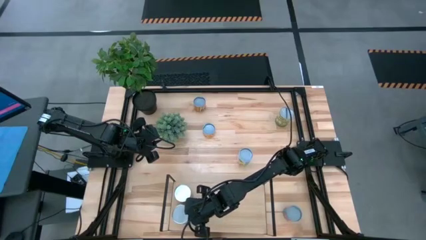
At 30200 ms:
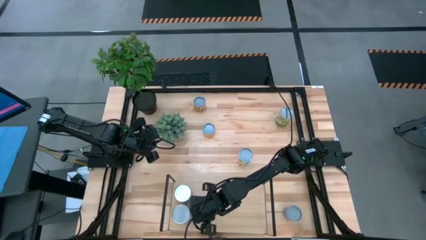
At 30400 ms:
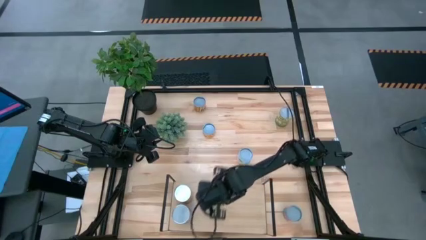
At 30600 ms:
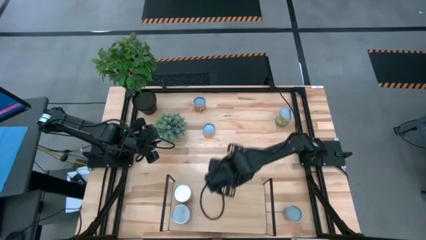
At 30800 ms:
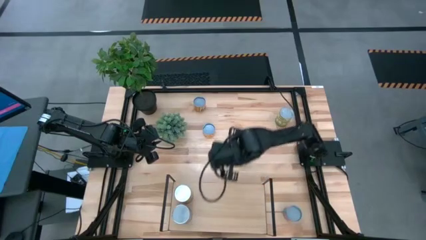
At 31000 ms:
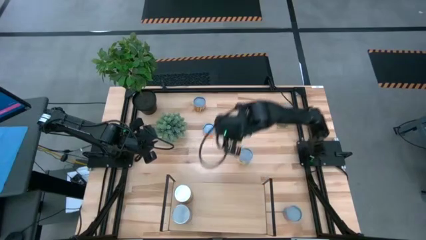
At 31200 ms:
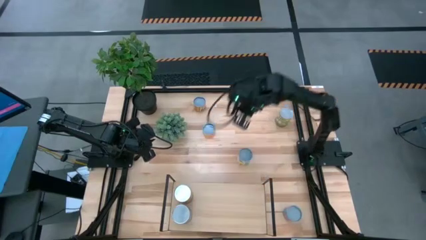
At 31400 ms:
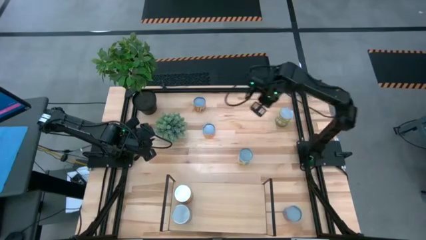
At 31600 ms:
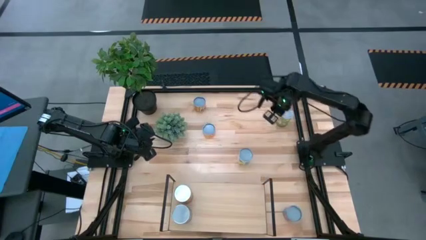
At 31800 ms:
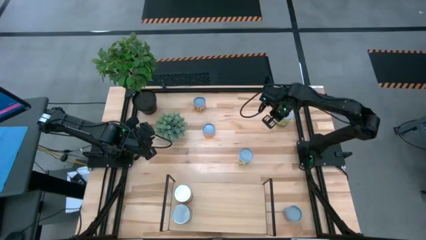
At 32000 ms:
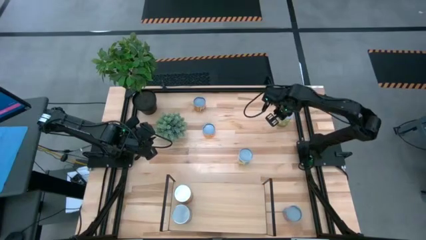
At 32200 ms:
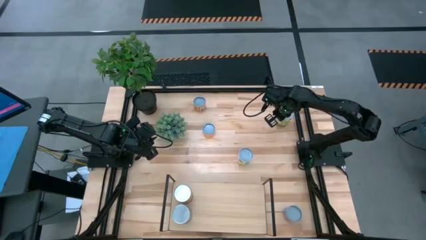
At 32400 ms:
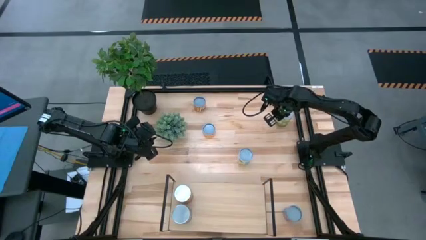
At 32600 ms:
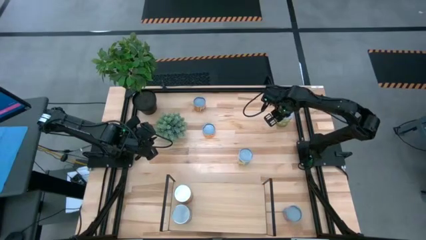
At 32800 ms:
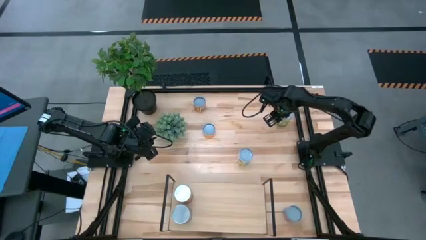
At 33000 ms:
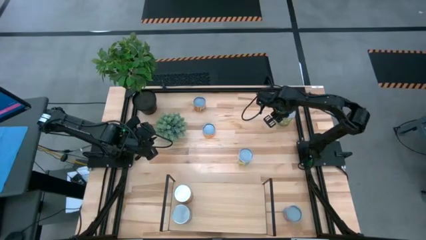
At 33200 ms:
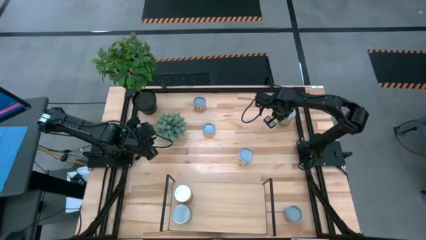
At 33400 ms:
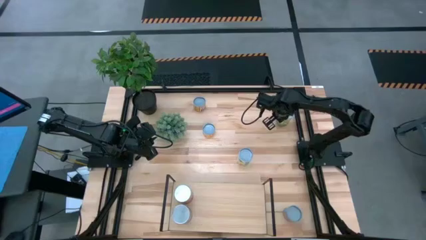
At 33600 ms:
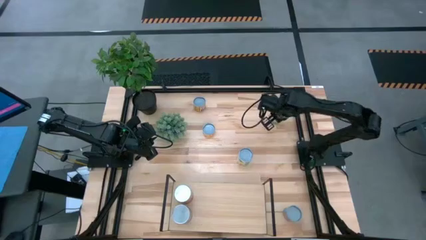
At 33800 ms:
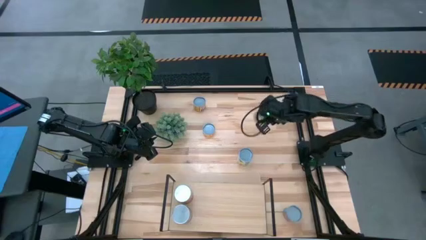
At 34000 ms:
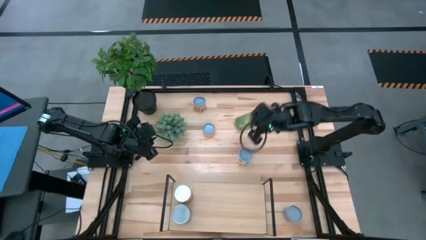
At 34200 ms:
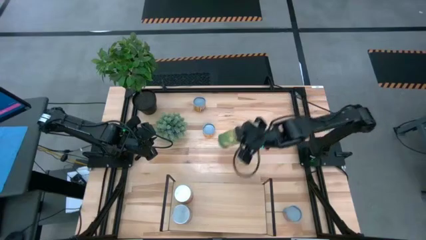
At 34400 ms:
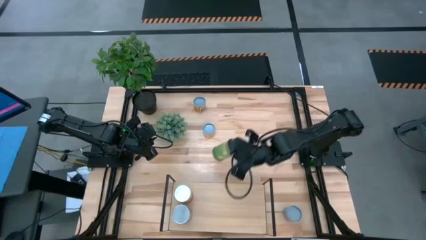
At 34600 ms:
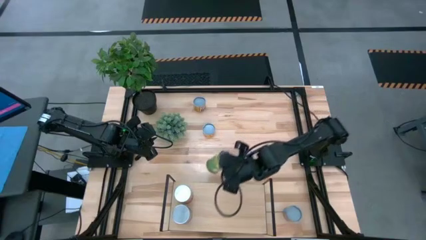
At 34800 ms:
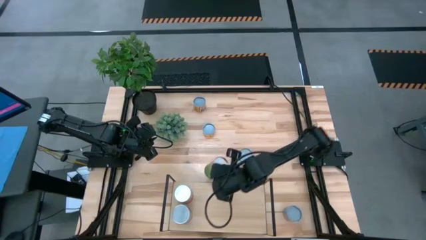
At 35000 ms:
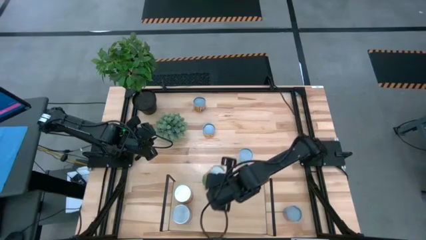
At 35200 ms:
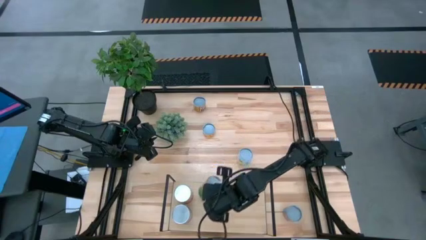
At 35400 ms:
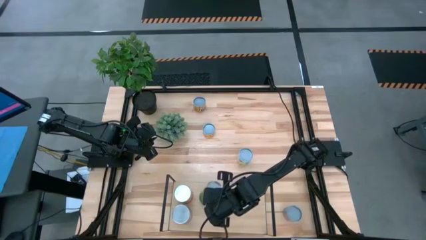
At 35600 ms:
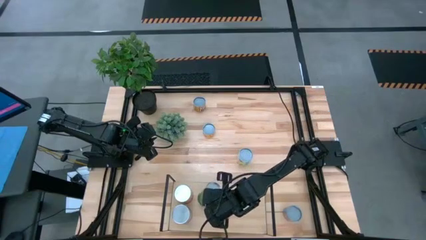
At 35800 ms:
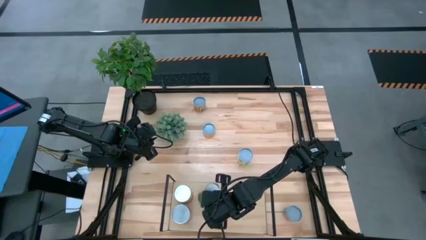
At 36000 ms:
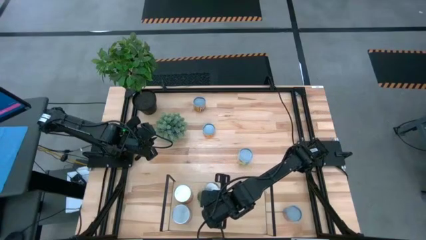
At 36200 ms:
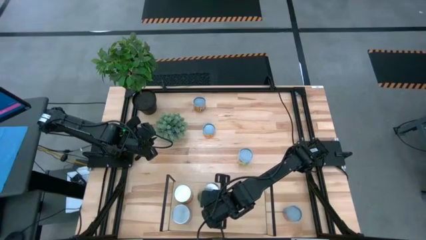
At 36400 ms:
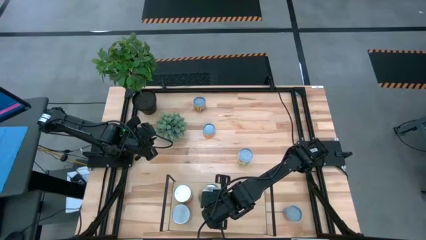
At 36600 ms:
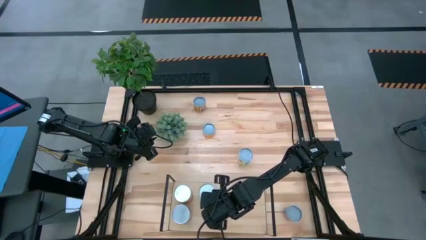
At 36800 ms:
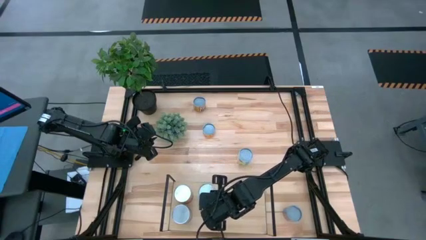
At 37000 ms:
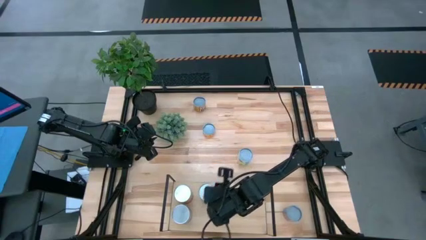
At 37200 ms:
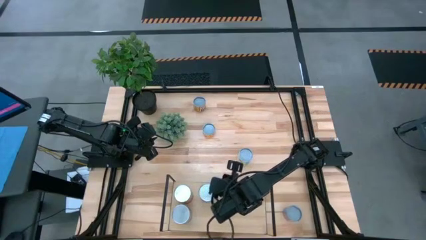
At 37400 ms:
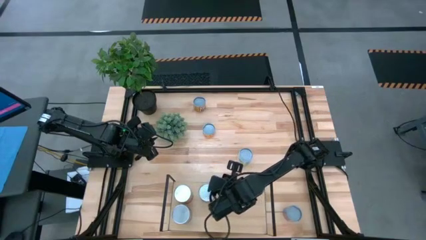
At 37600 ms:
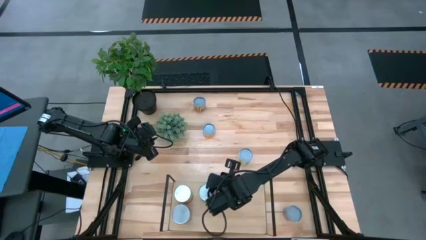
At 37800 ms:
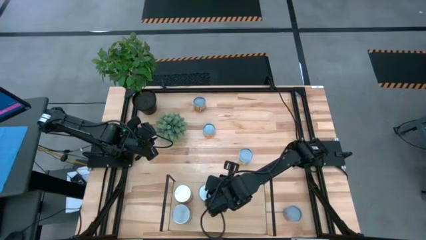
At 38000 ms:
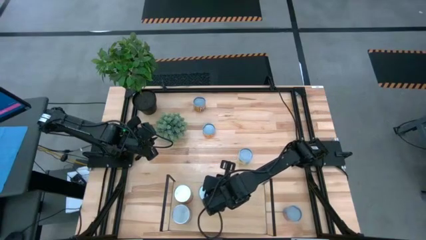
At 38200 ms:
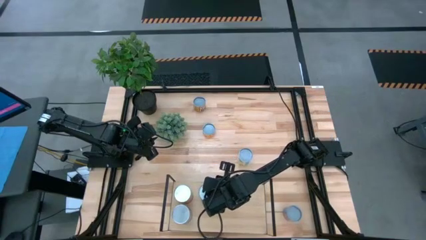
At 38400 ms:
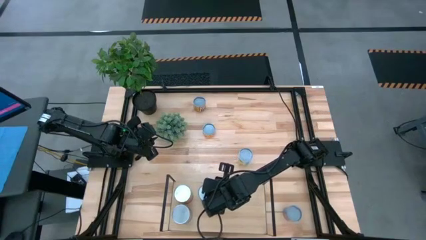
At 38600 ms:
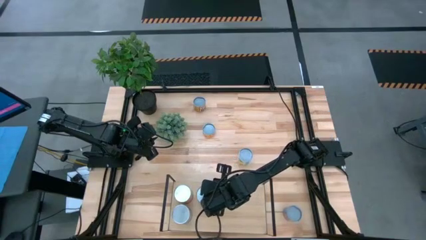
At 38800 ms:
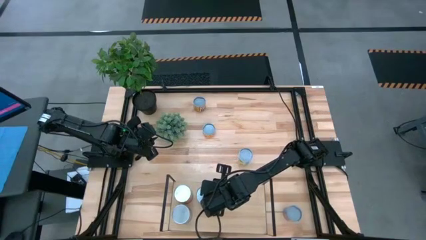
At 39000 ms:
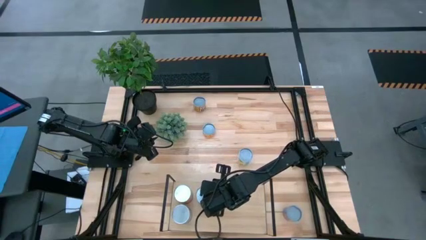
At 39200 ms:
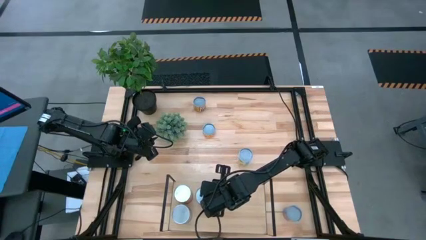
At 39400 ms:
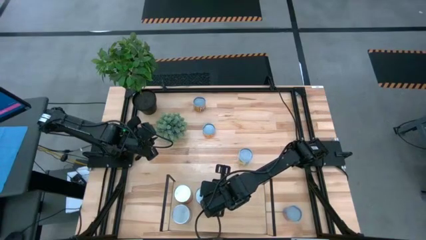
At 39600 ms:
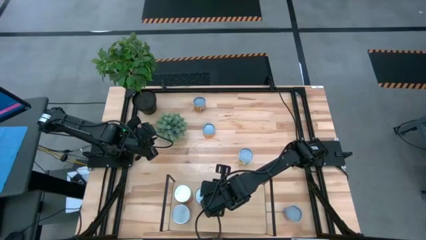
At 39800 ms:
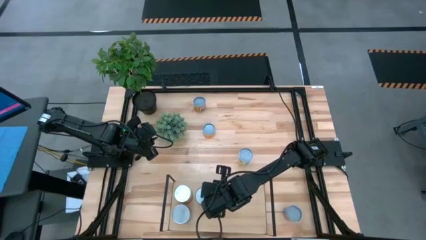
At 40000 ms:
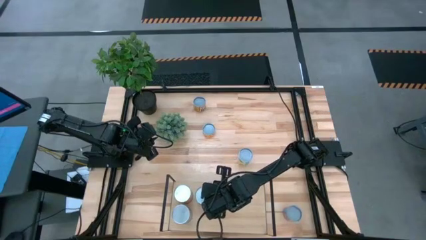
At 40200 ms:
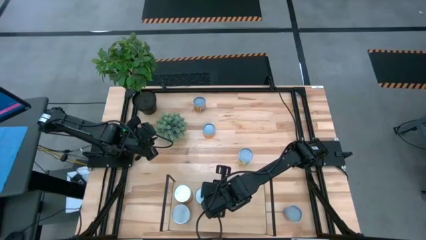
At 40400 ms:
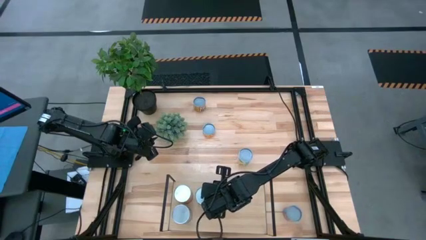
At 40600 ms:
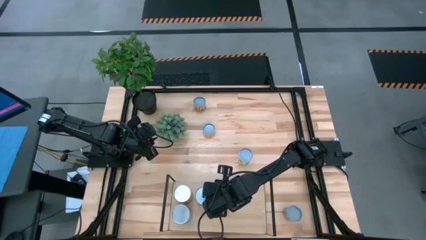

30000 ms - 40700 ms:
Task: Pick and place cans onto a shelf
Put the canned peaches on the shelf
